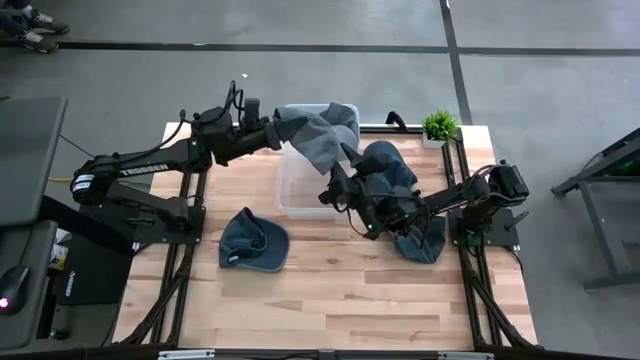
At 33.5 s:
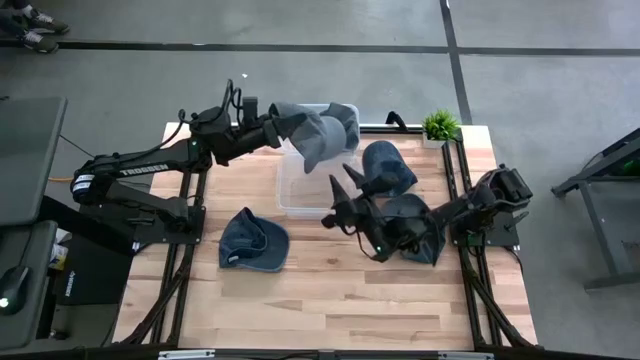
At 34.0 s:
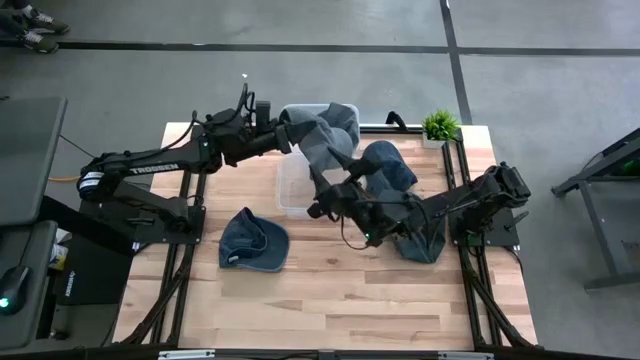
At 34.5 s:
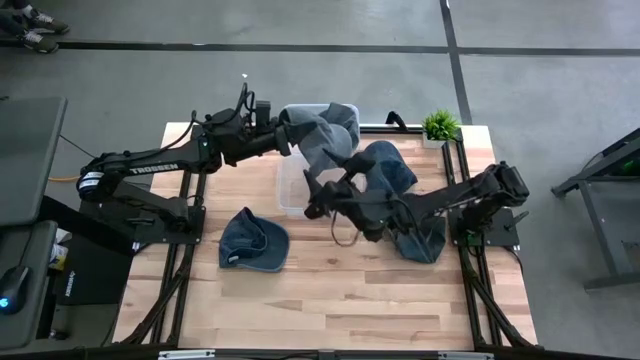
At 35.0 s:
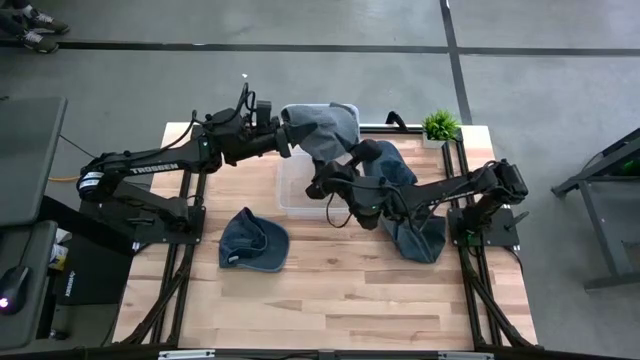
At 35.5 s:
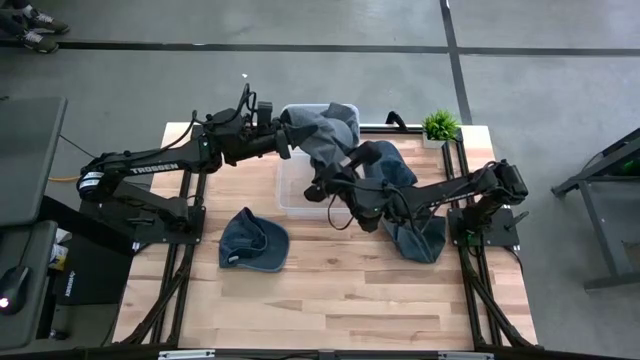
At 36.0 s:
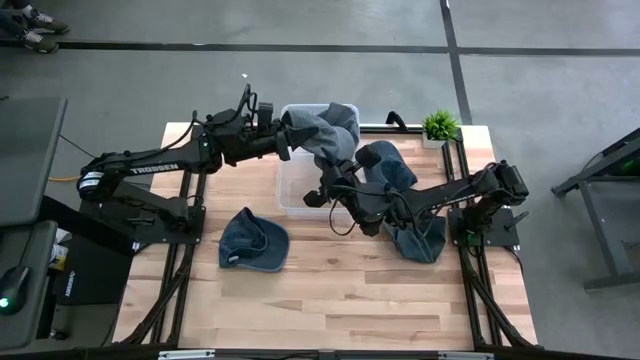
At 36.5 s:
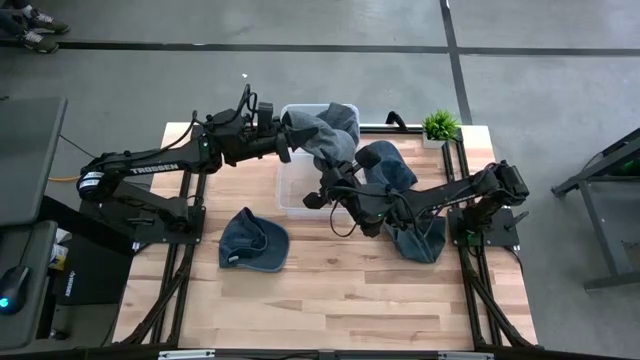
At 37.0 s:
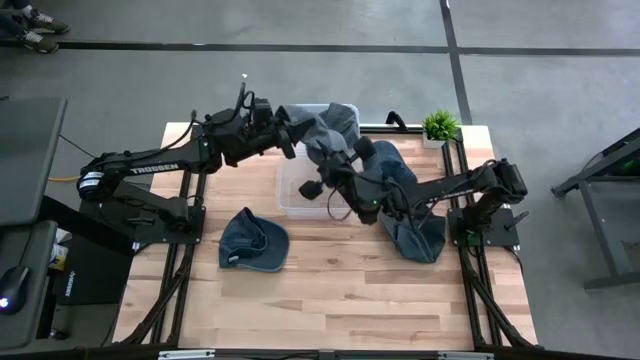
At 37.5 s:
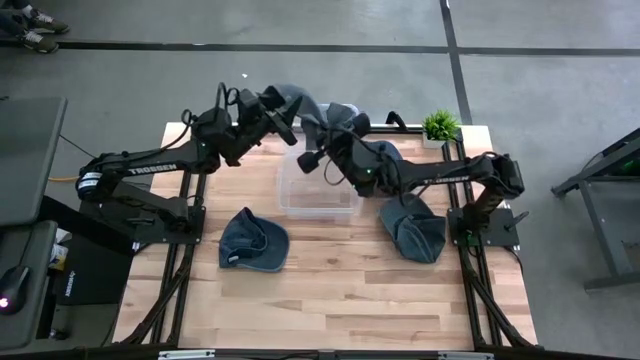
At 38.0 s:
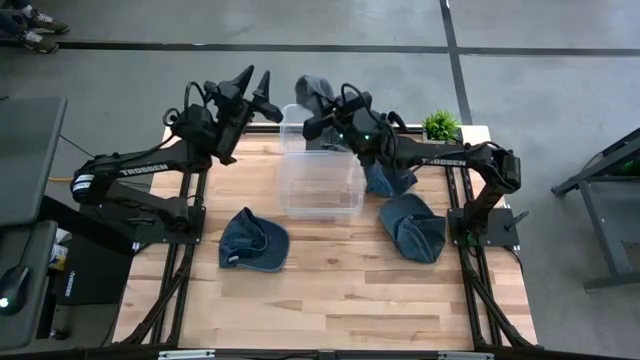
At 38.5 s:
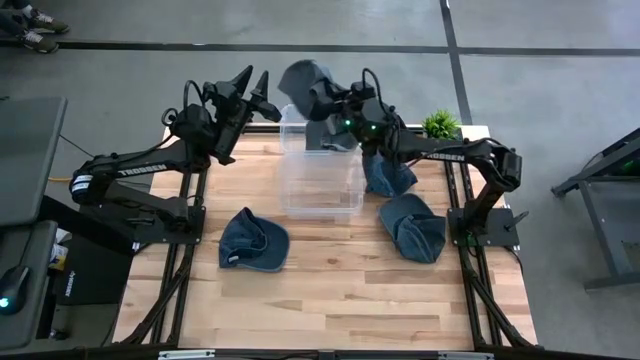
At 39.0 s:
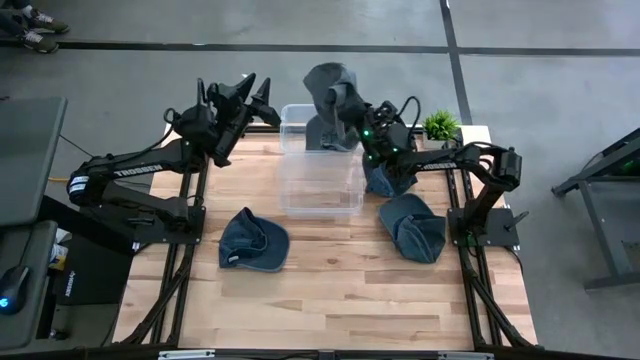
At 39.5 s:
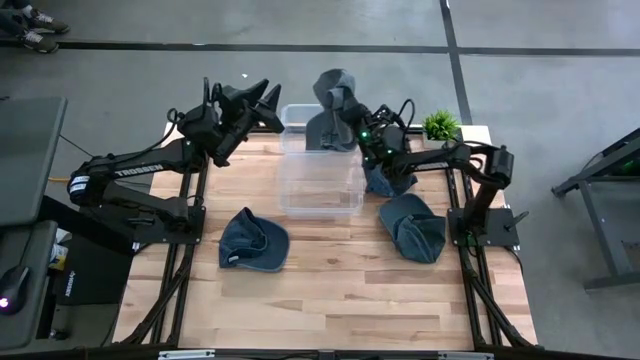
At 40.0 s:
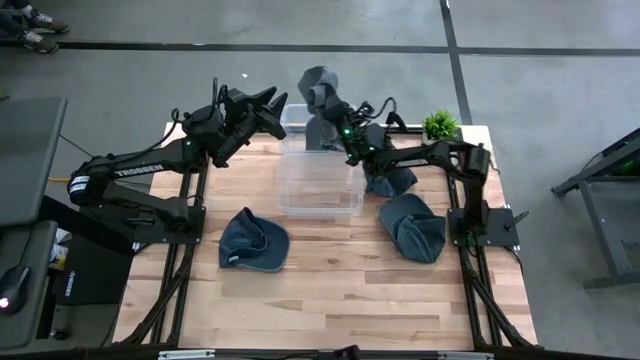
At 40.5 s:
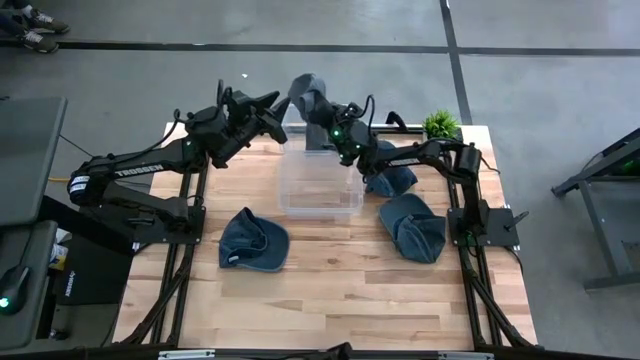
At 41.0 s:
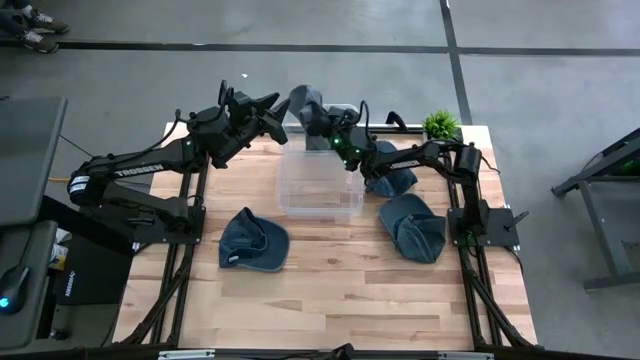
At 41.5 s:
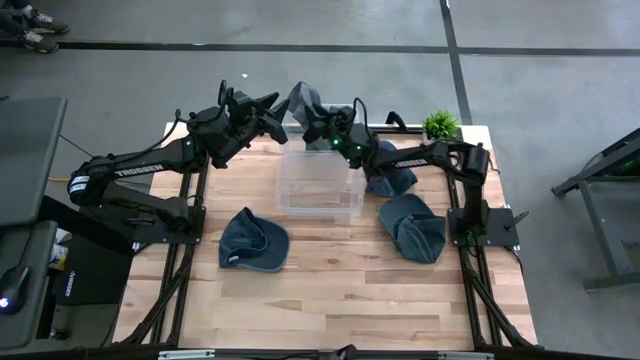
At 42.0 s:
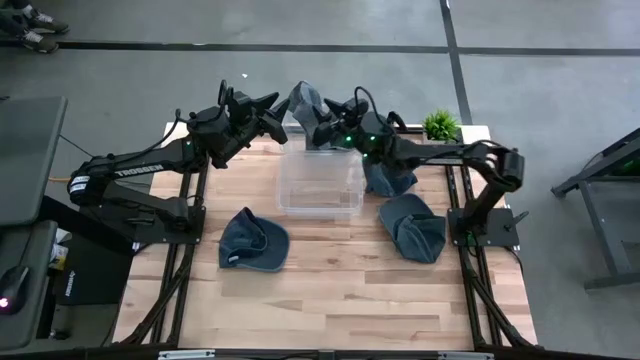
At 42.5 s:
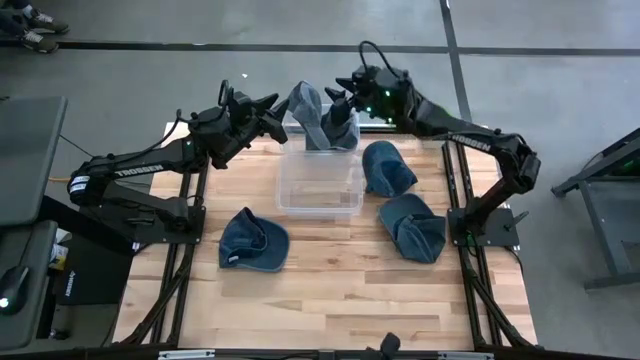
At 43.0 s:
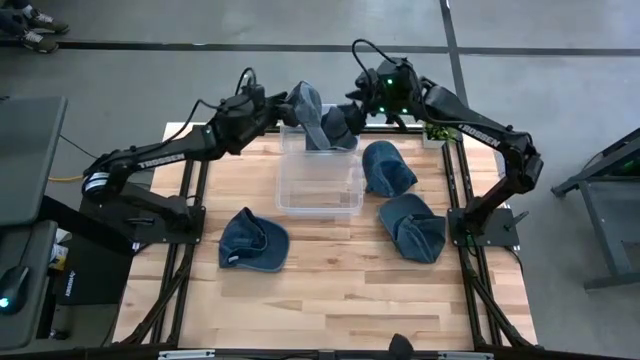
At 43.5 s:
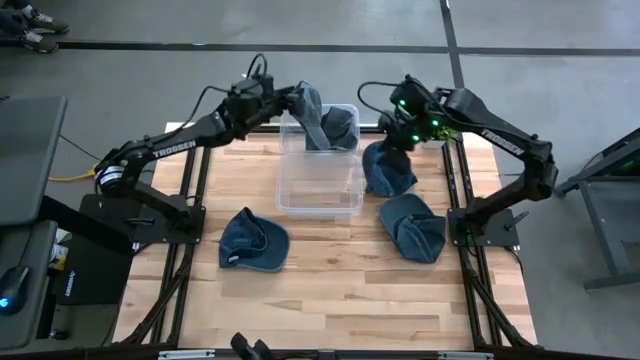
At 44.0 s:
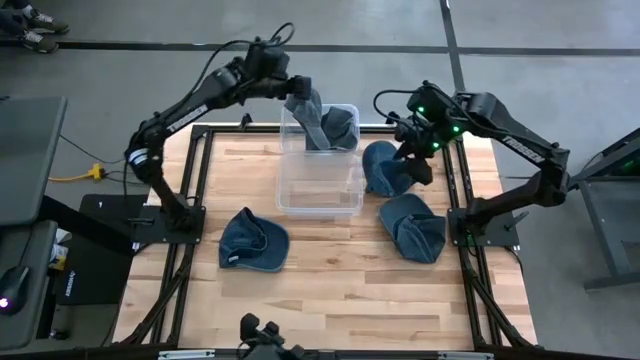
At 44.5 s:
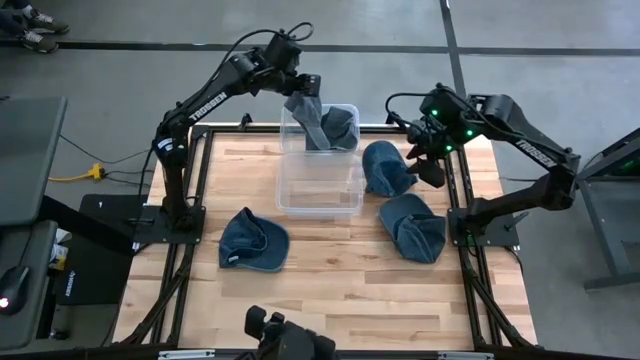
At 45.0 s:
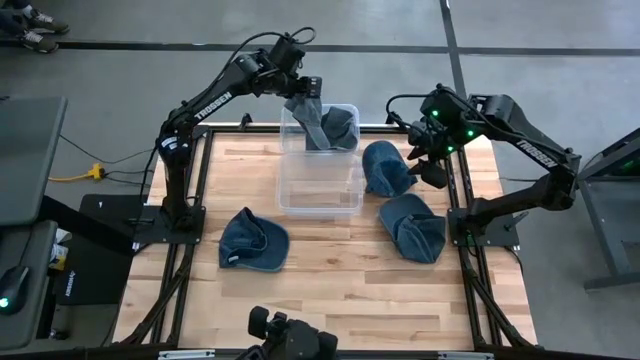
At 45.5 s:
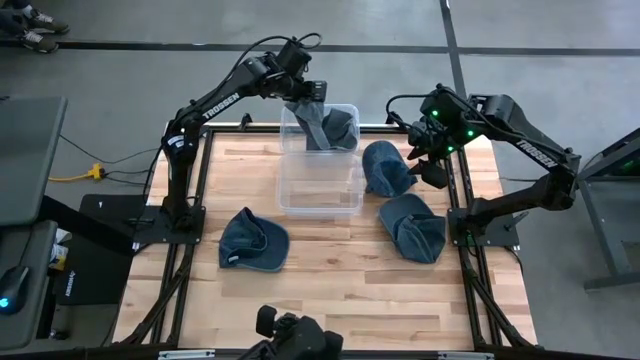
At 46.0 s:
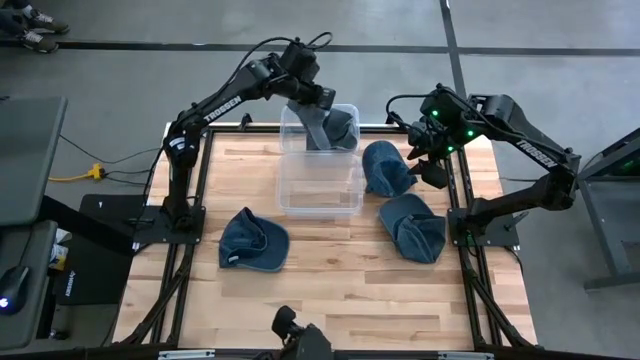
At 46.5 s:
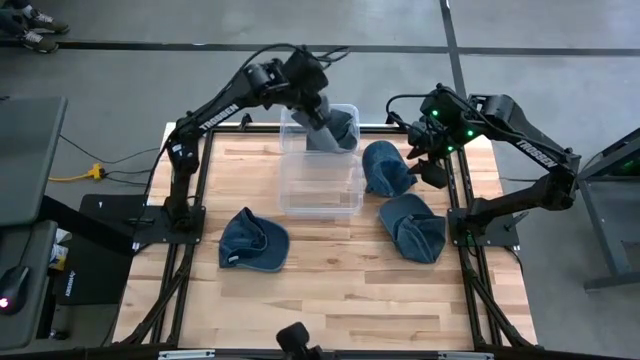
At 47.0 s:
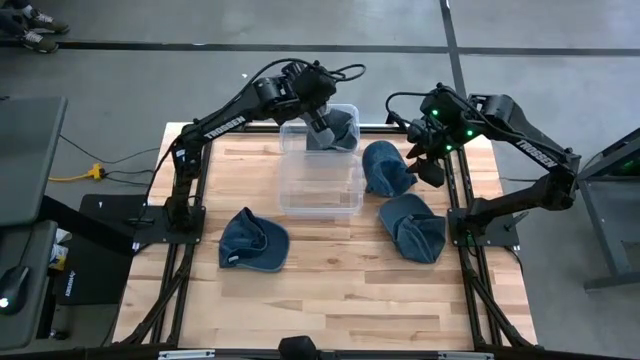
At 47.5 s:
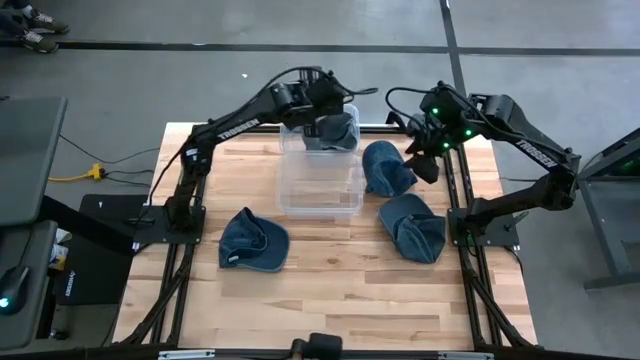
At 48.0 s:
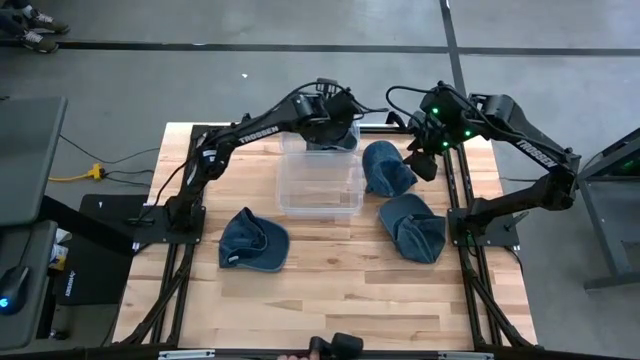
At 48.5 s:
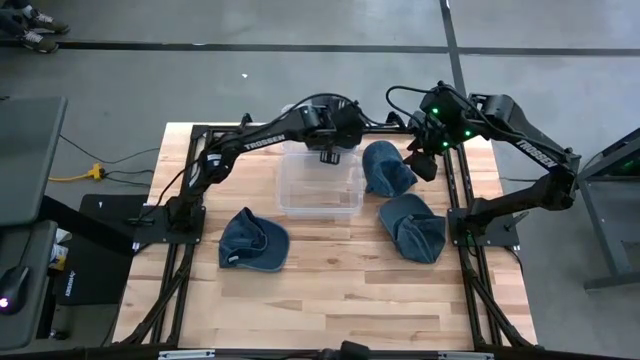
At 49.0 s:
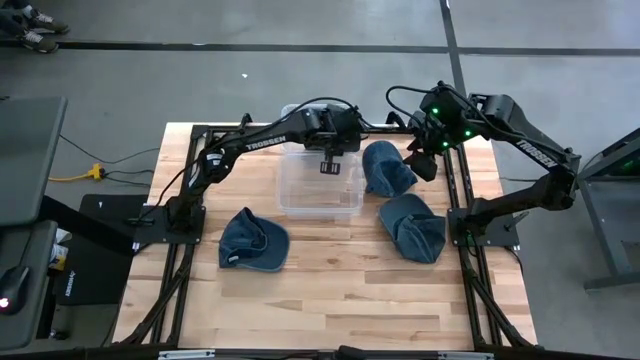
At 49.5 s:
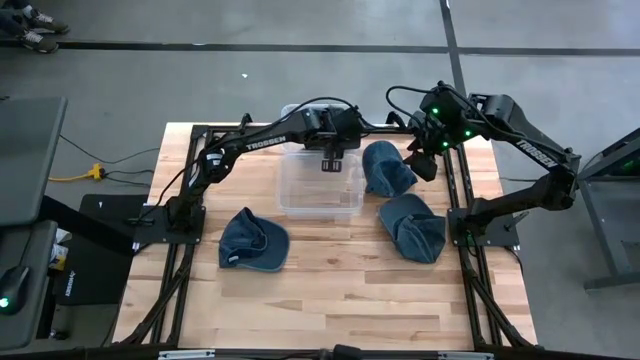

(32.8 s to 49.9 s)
Task: Pick & Place hat
Put the gray cap into the top transparent bin

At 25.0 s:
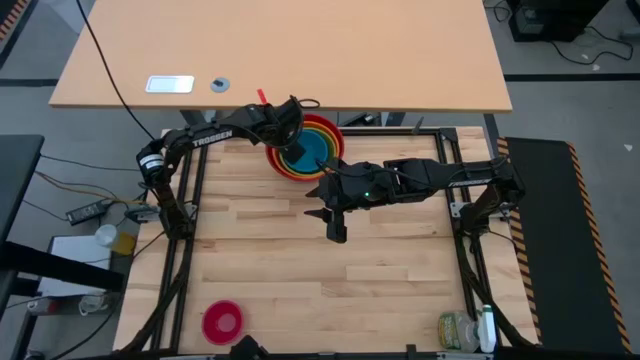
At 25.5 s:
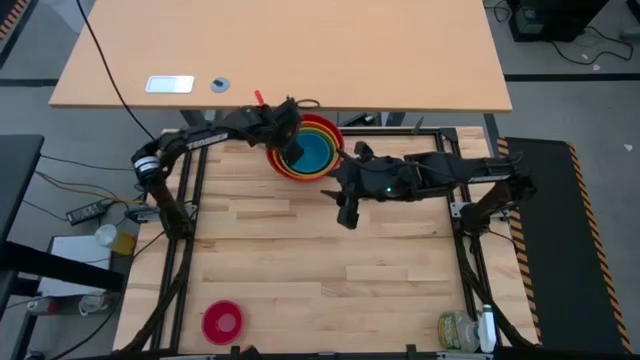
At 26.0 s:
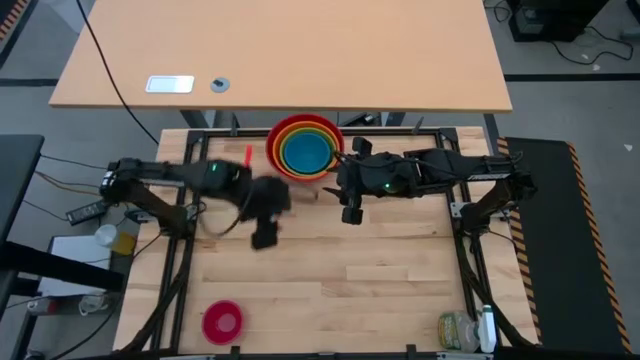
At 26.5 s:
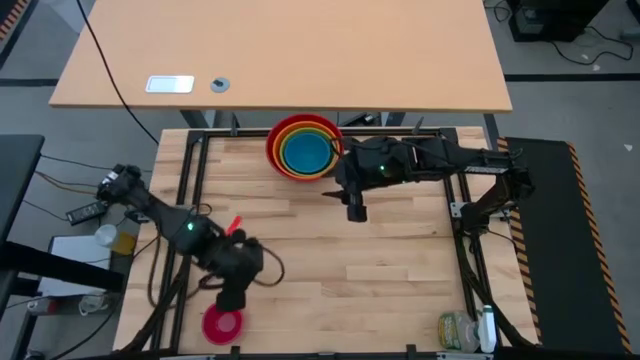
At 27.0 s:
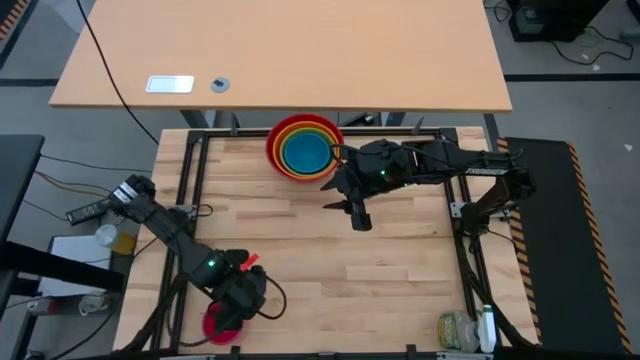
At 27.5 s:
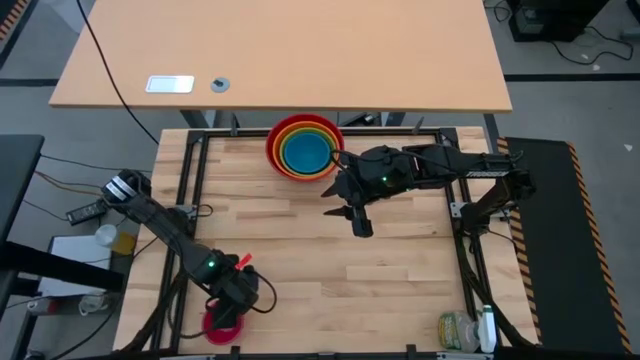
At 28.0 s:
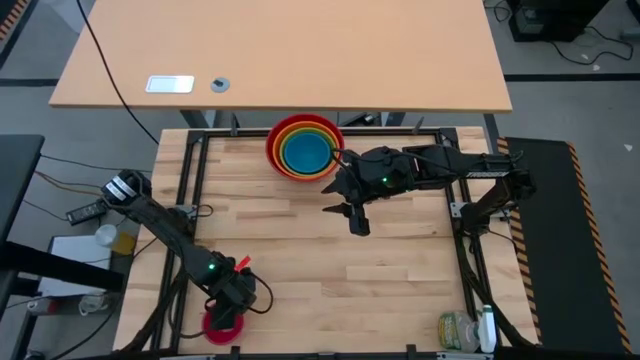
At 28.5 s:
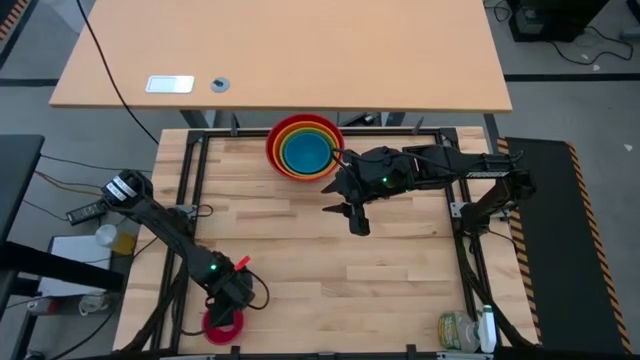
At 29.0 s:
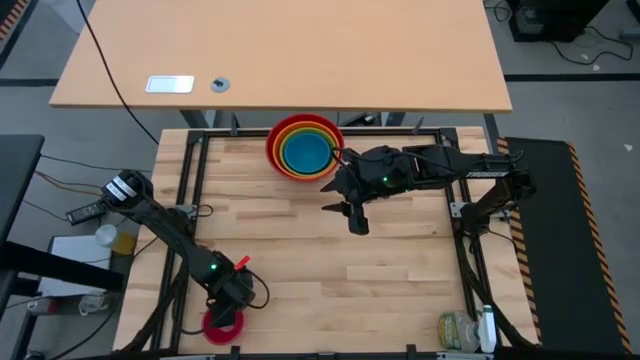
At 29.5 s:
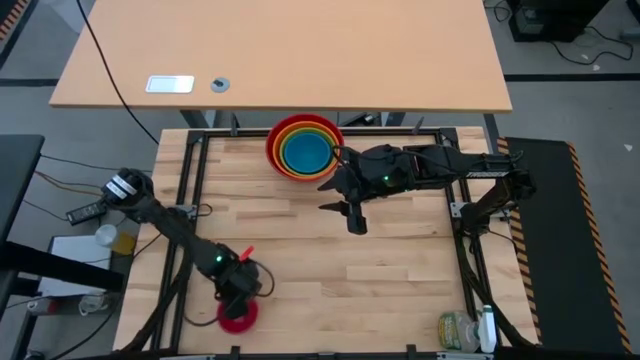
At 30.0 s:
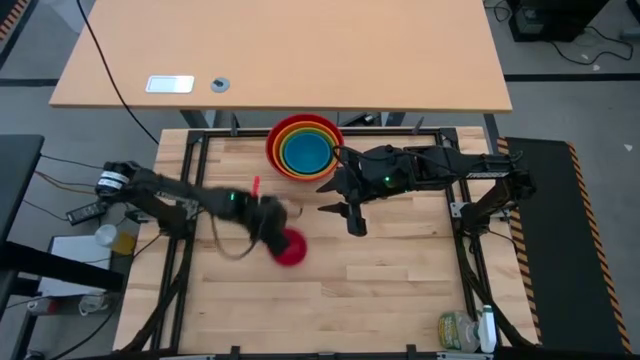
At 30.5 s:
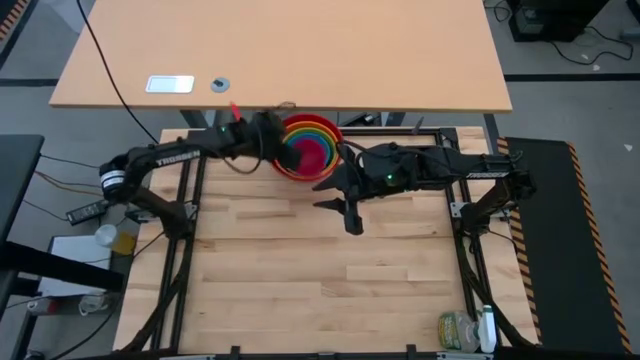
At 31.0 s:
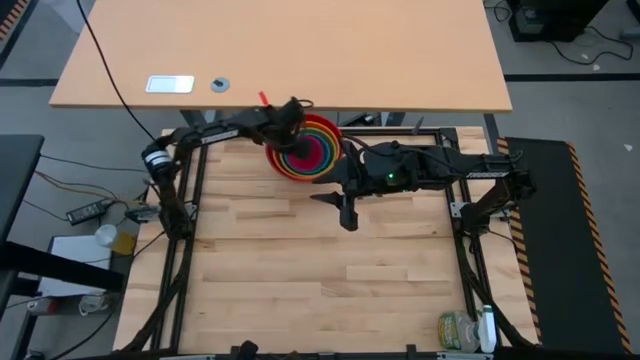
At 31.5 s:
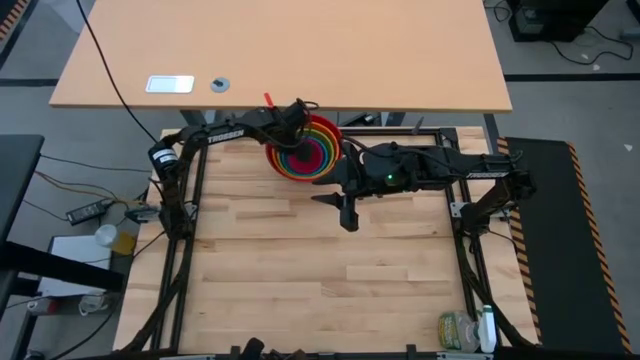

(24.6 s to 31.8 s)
Task: Nest bowls inside each other by size order
Stack the pink bowl on the blue bowl
